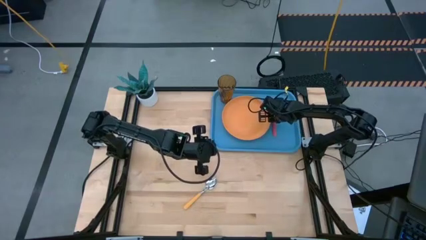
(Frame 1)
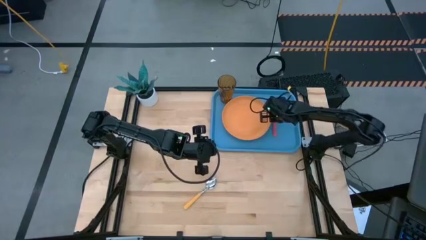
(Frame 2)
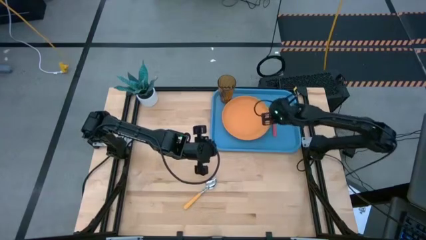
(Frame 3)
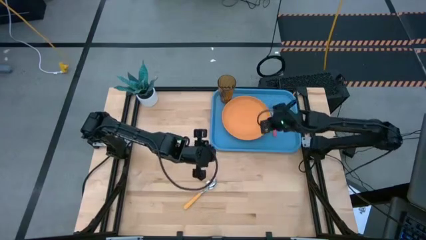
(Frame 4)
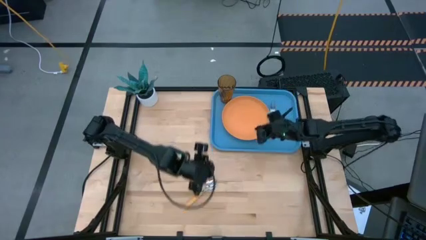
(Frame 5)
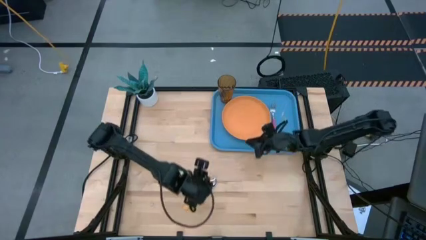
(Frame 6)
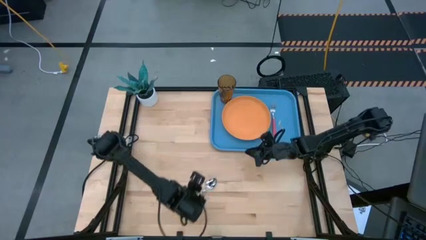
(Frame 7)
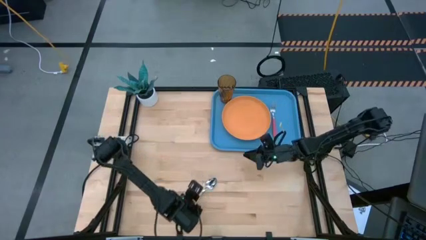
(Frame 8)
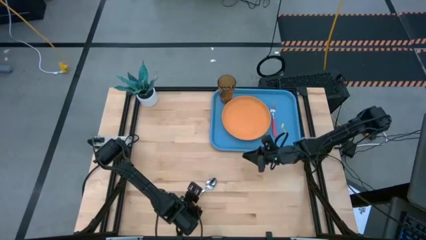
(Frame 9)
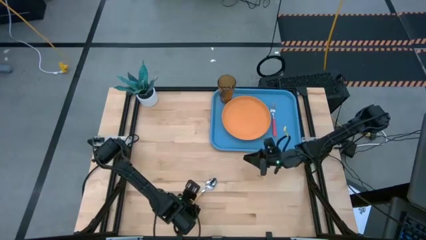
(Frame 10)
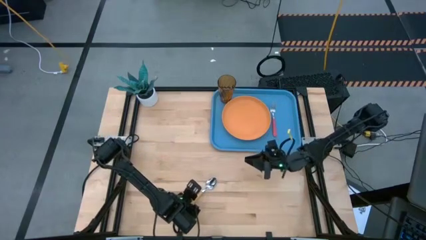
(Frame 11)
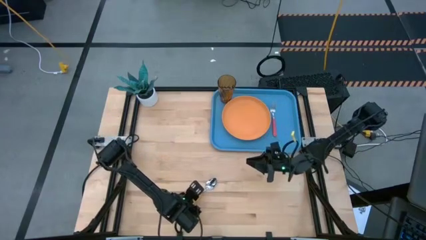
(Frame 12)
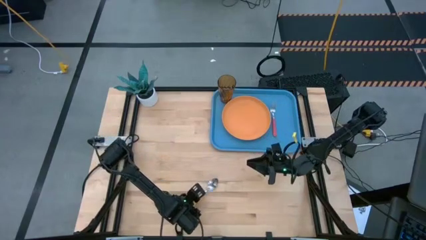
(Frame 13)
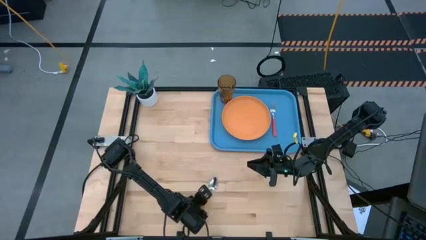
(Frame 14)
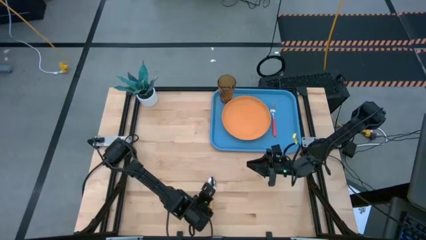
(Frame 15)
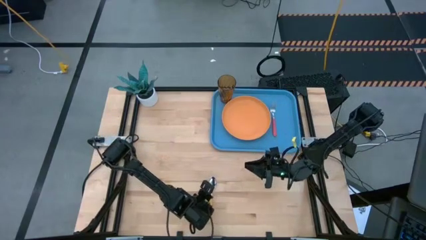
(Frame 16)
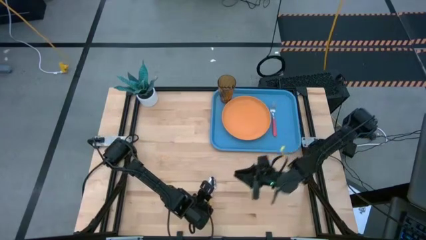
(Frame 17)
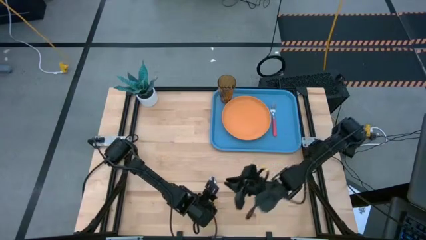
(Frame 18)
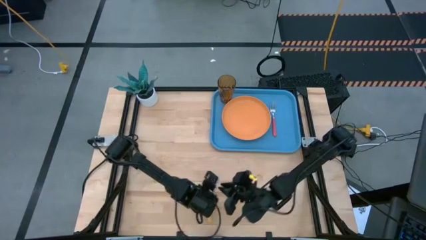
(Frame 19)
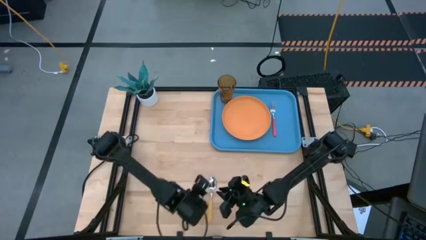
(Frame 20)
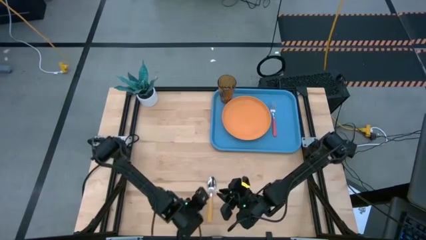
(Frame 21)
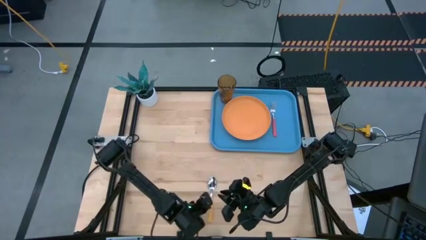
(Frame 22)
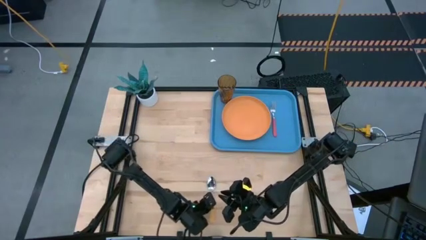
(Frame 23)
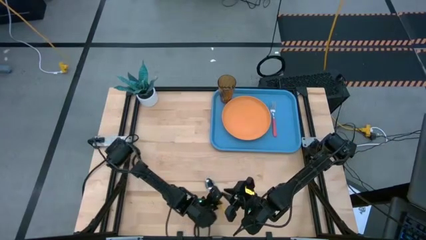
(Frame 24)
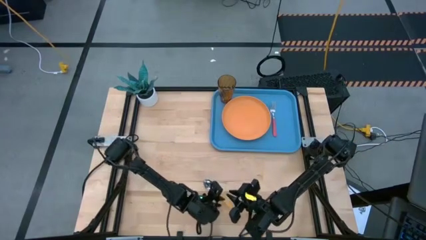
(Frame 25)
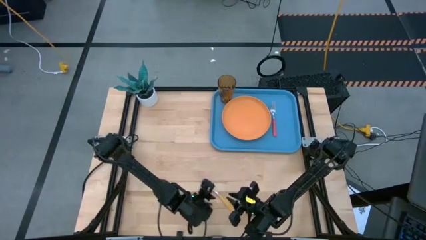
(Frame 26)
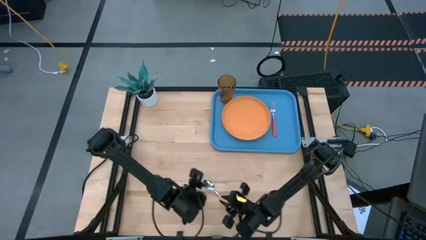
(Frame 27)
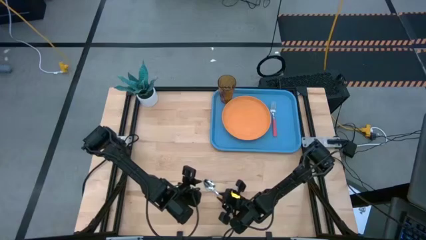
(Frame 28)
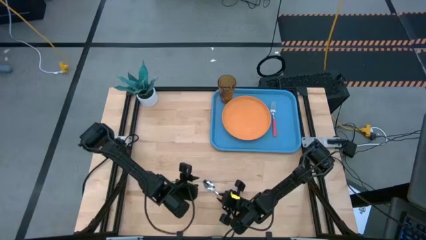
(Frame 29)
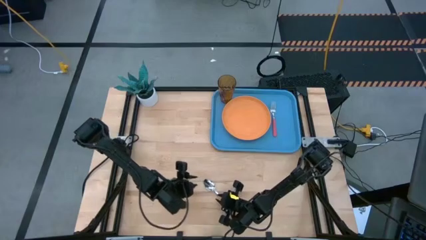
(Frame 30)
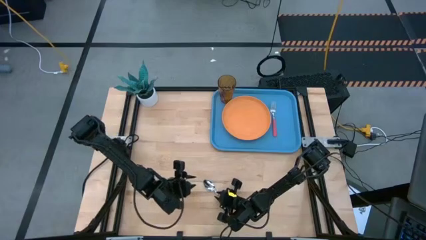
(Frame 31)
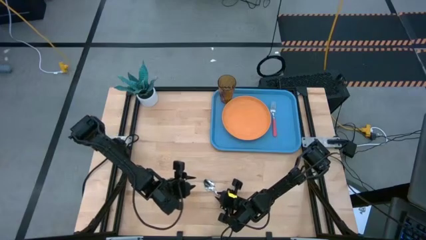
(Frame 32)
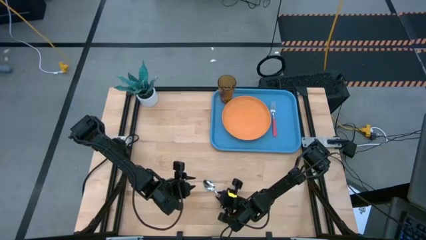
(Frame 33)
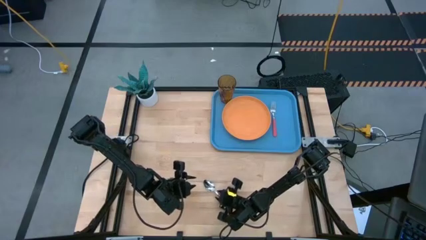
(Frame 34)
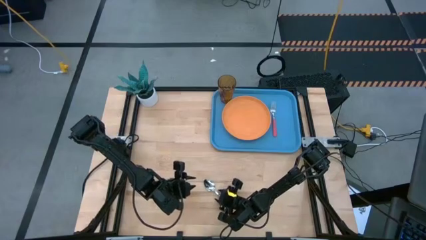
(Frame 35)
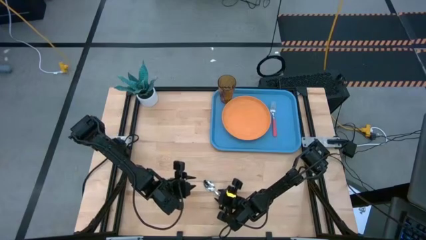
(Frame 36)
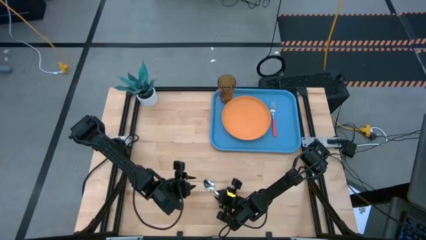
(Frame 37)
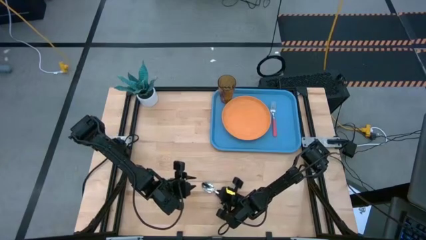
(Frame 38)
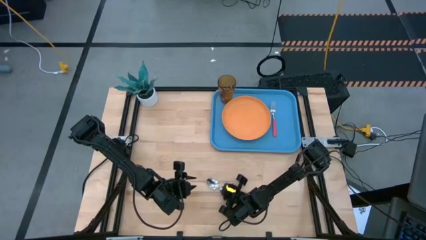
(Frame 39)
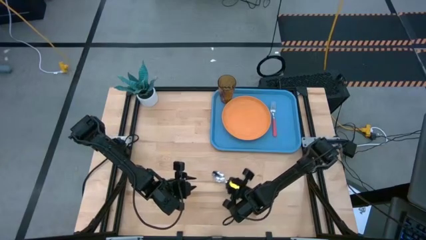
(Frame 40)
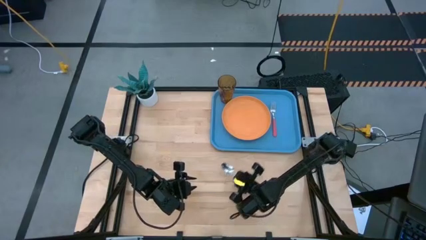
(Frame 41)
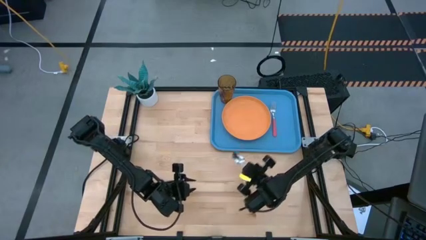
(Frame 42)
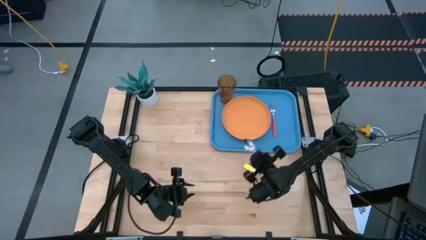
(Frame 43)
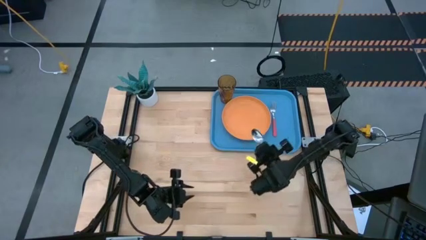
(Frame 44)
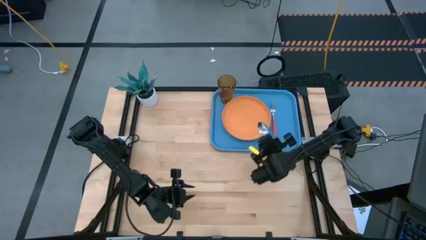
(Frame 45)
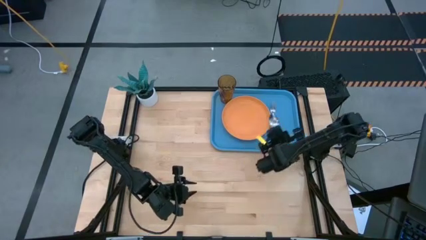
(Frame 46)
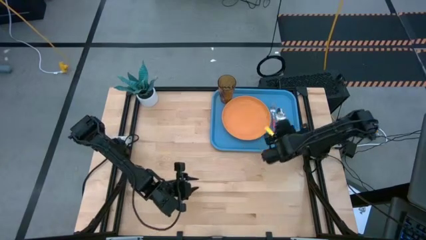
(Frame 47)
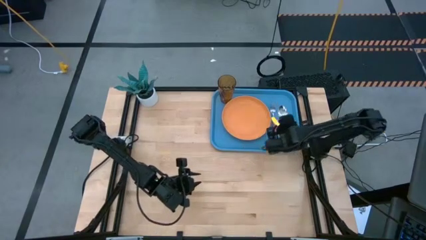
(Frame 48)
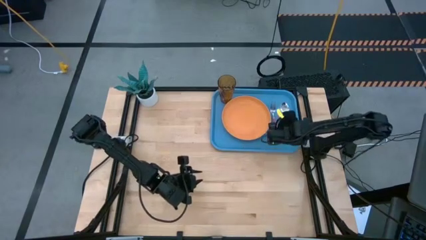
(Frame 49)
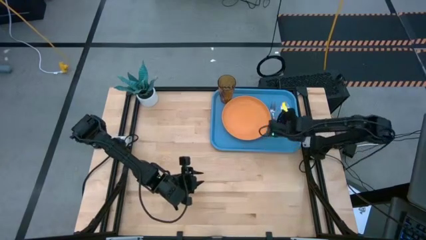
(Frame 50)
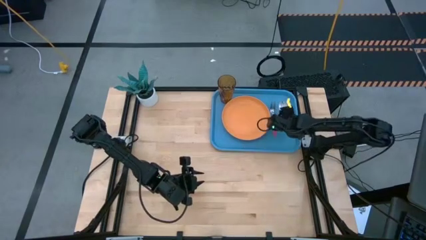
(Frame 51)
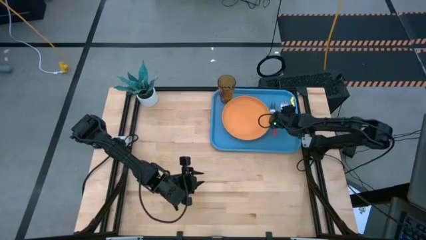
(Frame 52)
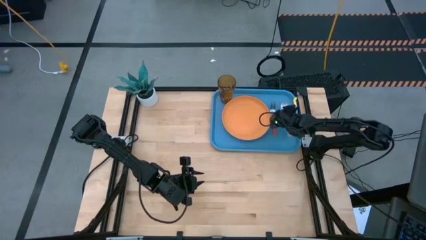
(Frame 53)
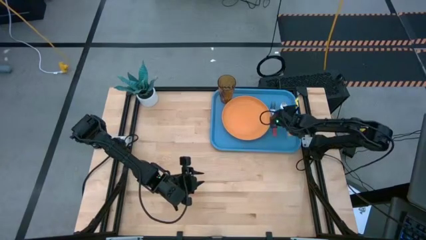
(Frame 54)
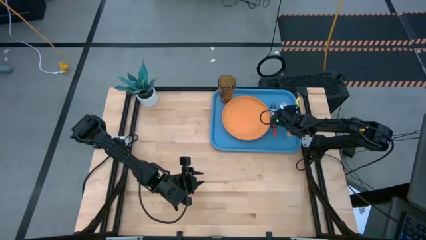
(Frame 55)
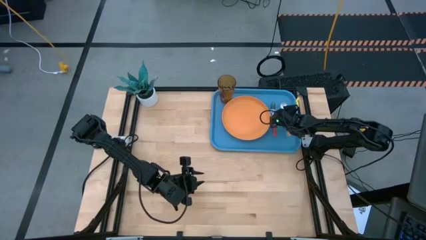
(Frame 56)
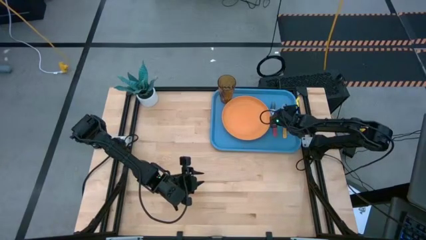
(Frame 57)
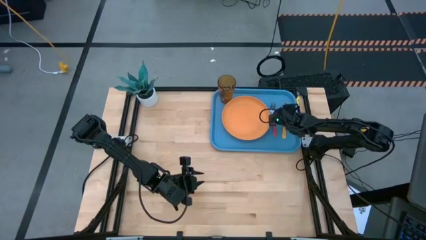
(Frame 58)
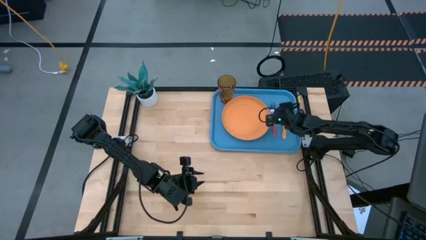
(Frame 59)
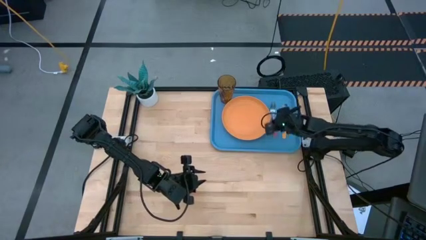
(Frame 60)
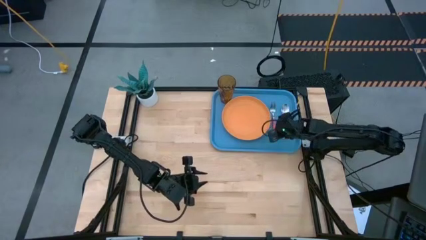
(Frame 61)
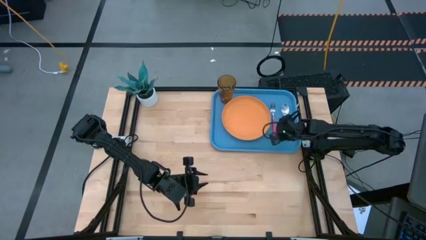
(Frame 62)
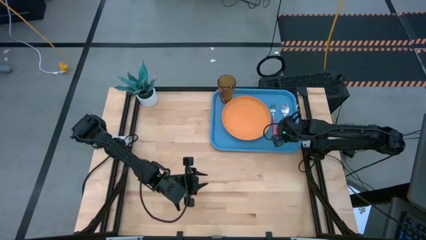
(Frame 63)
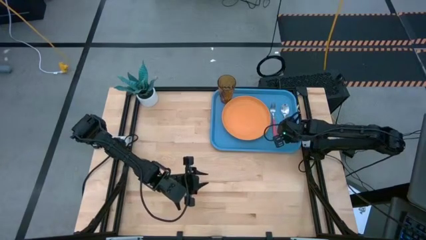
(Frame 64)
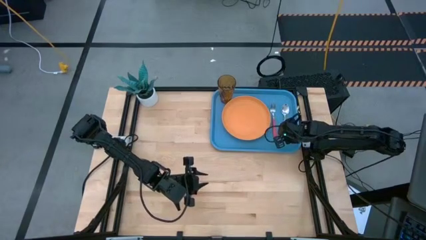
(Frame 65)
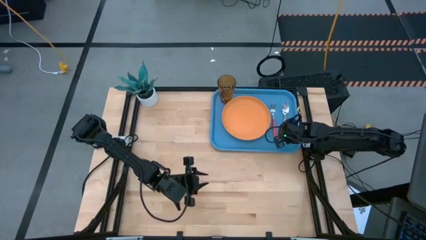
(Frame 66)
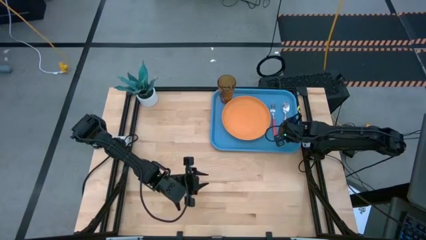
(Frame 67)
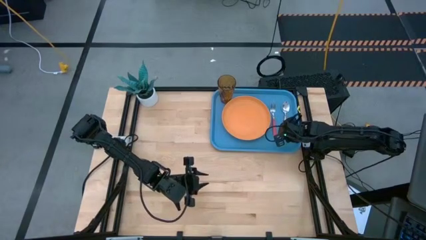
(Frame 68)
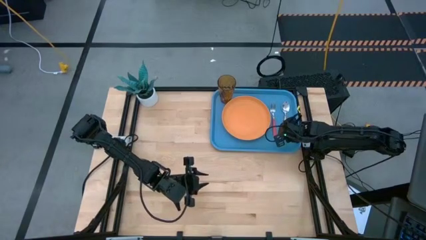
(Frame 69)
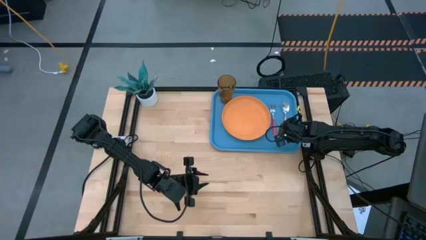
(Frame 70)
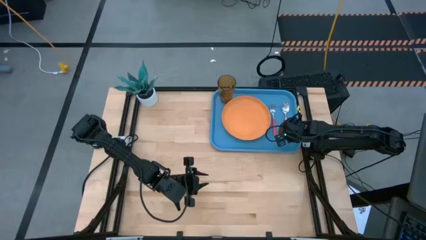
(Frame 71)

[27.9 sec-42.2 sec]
Task: Pick and place plate/cup/fork/spoon on tray
Put the yellow spoon on the blue serving tray to the right of the red fork

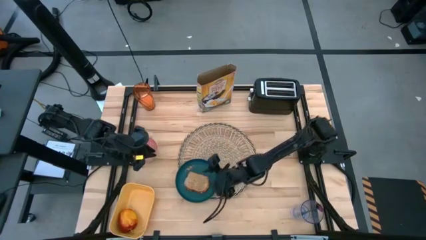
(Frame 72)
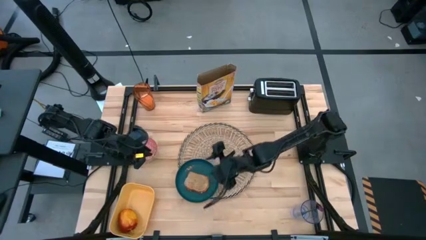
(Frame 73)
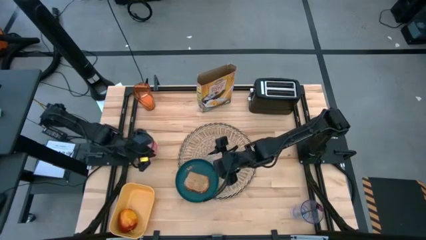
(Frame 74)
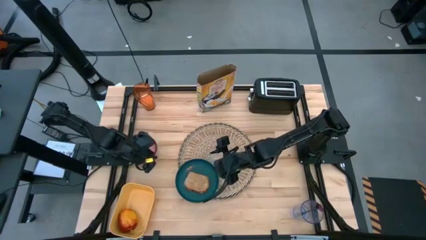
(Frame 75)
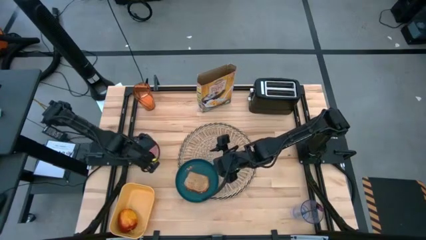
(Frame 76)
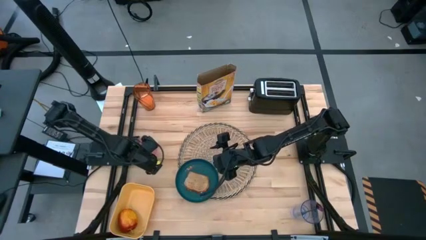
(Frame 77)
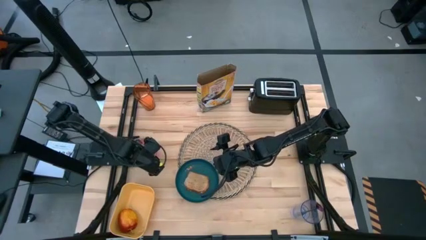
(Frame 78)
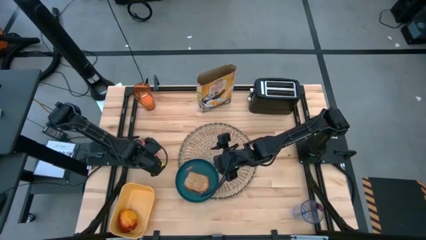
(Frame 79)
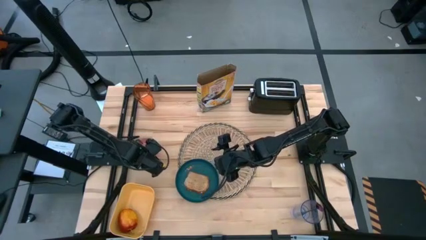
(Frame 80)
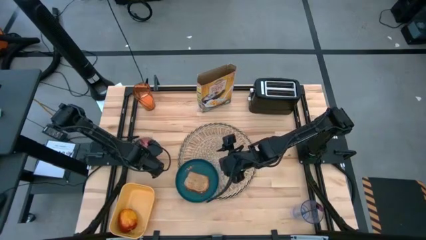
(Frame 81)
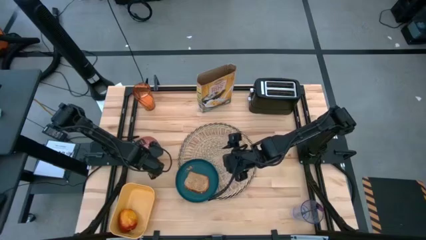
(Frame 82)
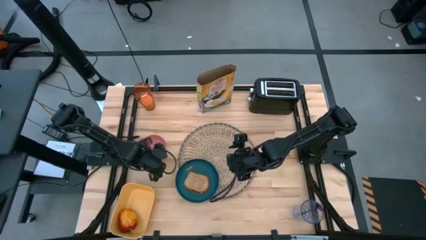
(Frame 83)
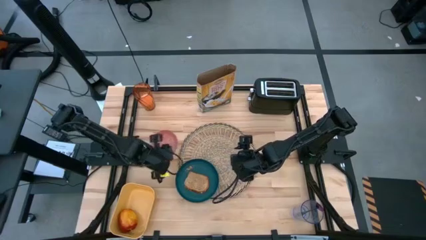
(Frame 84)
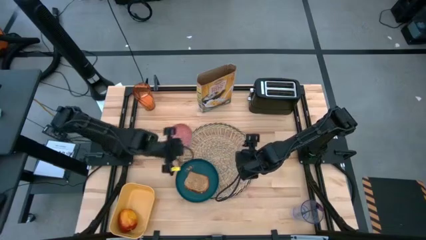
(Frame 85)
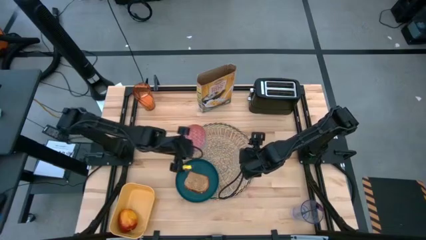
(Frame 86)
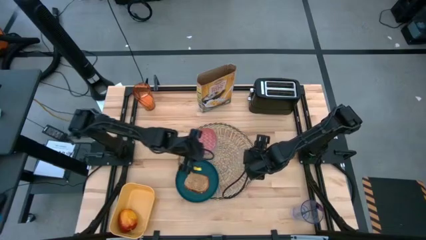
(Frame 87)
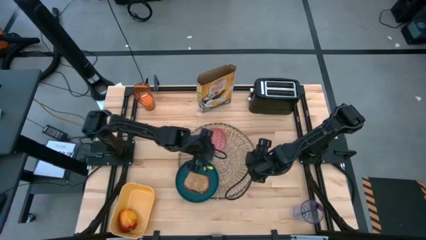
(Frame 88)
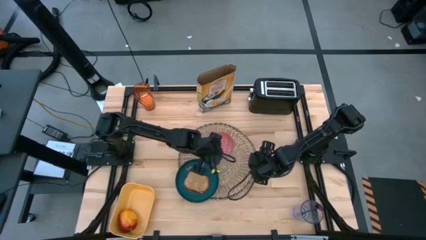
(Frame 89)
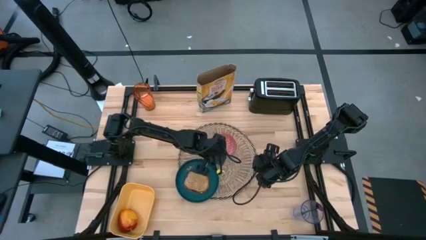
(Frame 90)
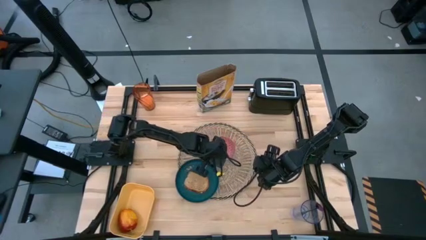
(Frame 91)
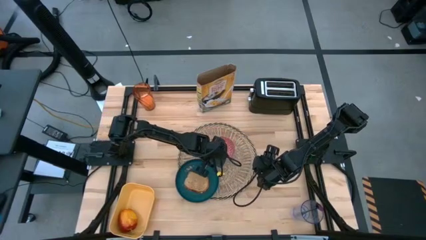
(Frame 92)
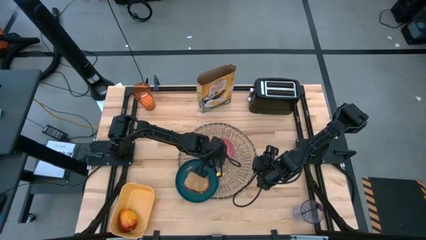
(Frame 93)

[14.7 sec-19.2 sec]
Task: Arrange a breakfast setting
Put the red patterned bowl on the brown table mat
